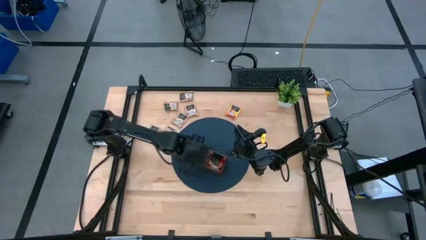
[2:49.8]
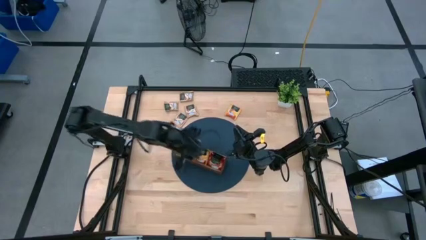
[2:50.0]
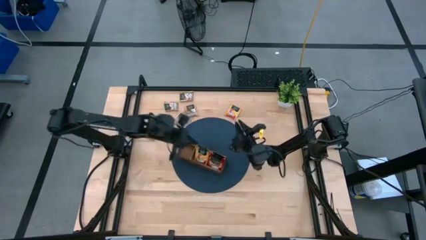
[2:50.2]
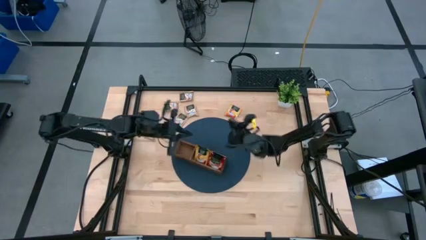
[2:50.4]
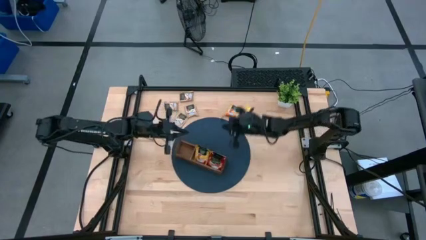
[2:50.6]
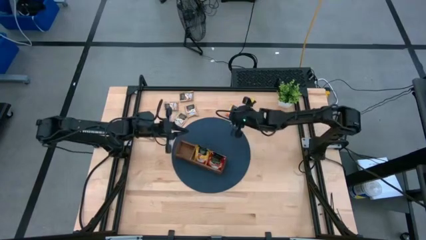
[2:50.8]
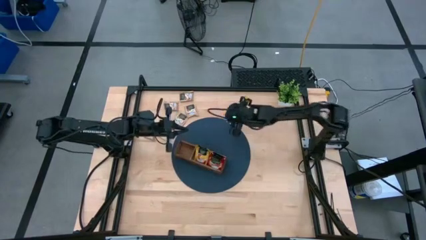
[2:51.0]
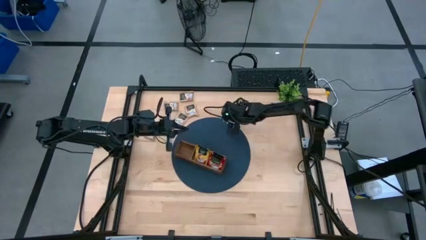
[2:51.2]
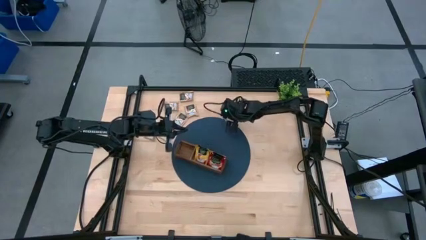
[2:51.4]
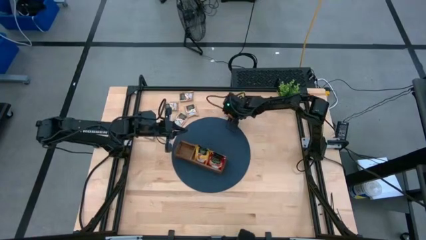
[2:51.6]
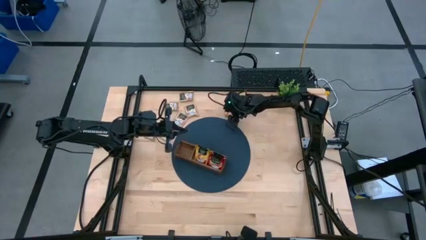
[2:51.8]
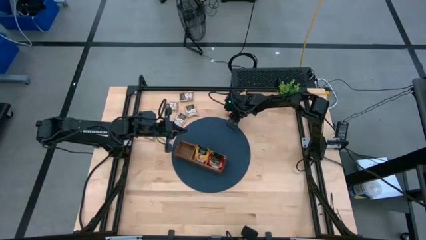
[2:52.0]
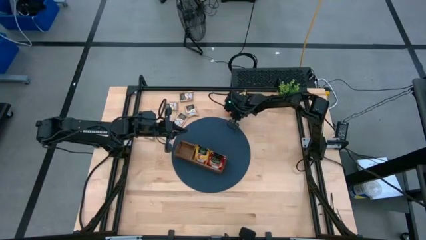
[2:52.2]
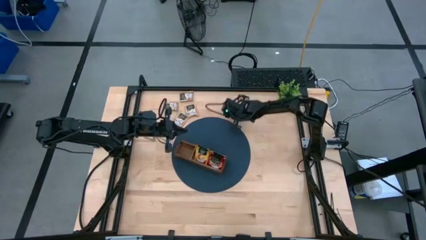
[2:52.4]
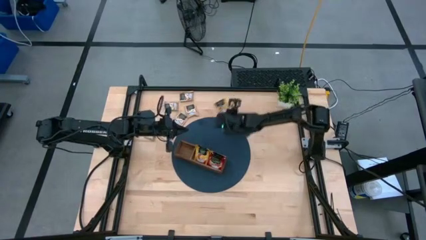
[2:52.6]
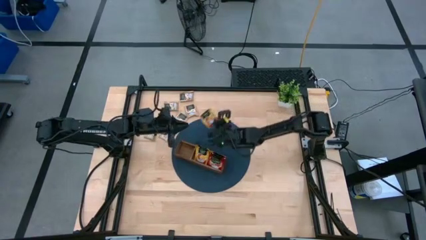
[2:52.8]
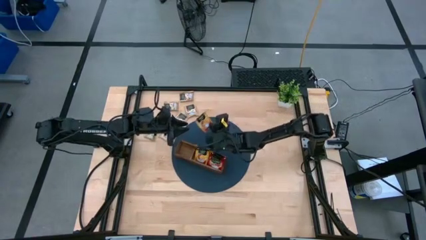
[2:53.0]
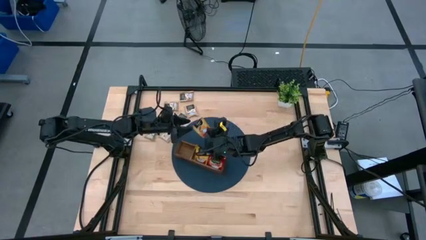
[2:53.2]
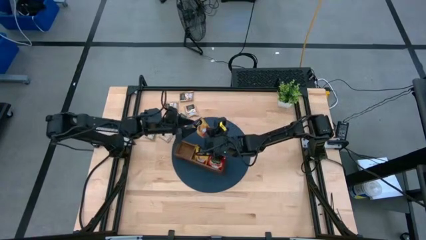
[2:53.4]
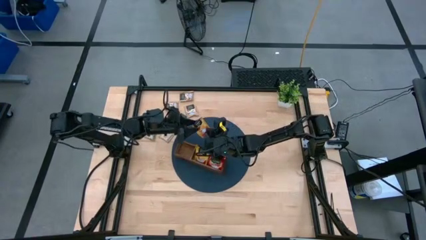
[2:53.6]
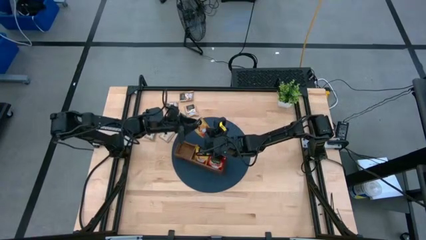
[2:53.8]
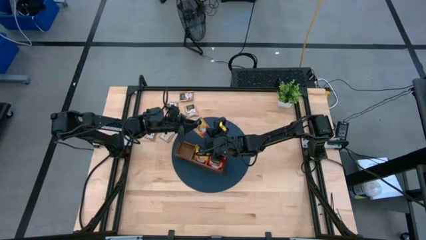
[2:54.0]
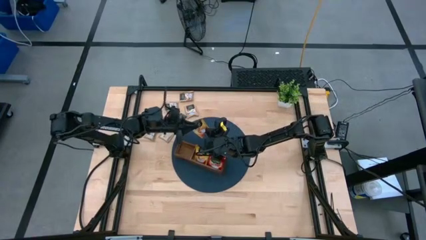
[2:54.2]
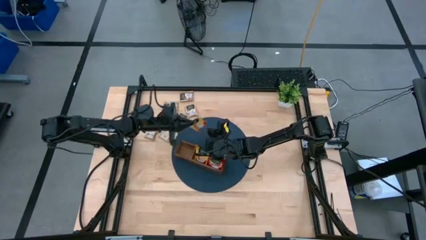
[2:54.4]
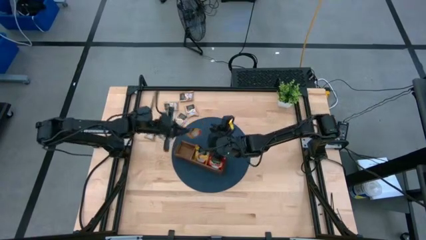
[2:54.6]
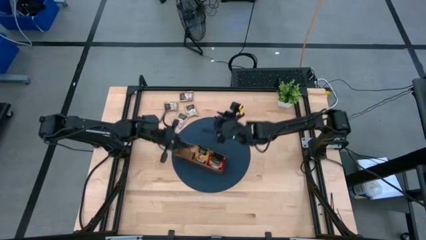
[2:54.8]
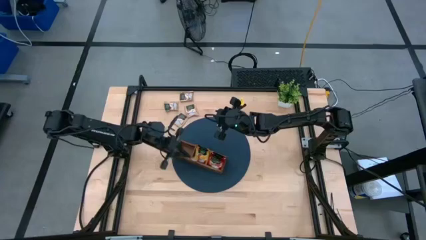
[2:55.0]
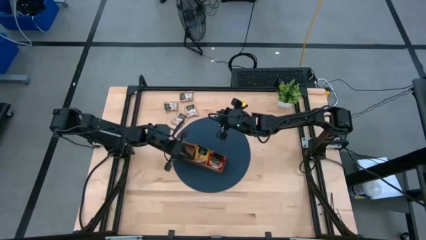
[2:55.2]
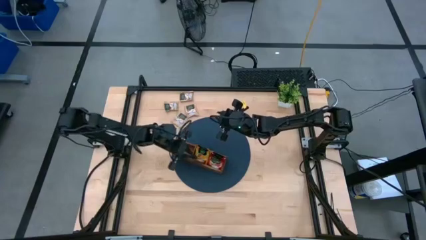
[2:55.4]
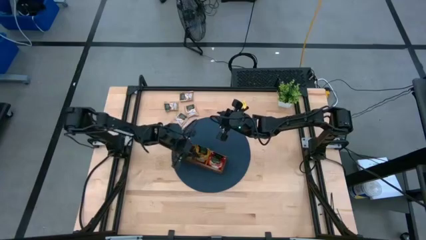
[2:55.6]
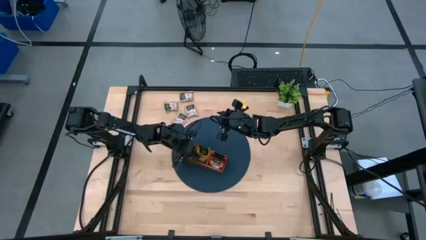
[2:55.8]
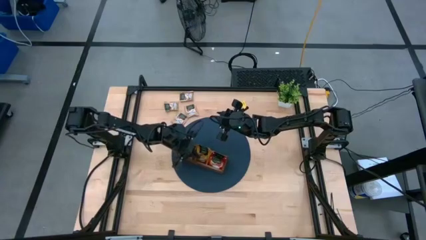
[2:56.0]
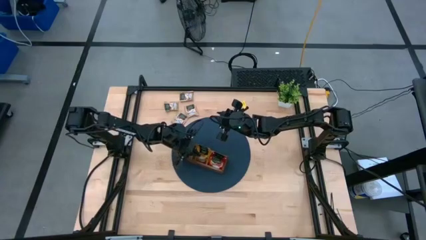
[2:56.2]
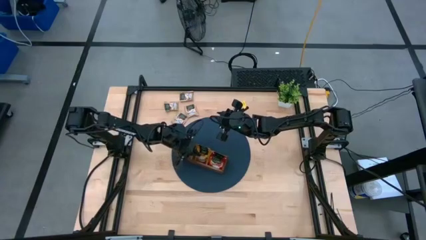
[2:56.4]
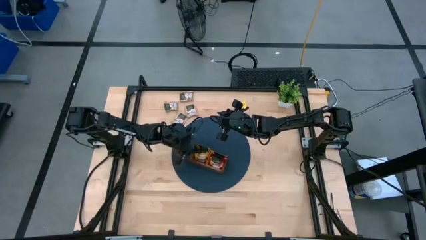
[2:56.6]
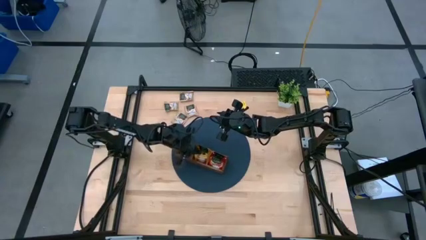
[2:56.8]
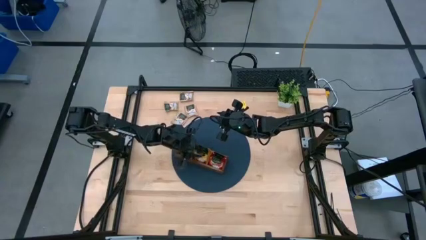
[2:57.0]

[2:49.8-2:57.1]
Task: Pick & Place Tea
Put the yellow tea bag into the middle section of the wooden organizer

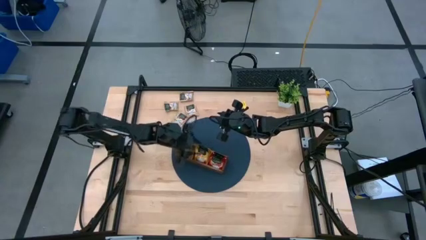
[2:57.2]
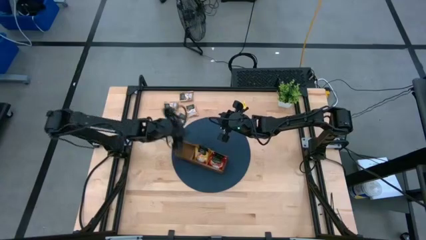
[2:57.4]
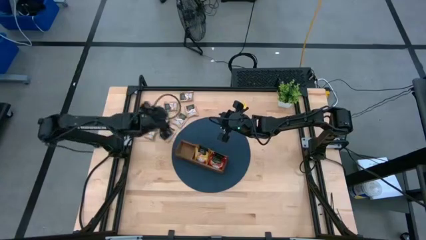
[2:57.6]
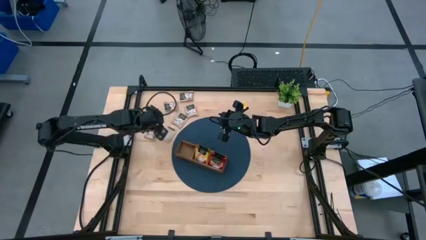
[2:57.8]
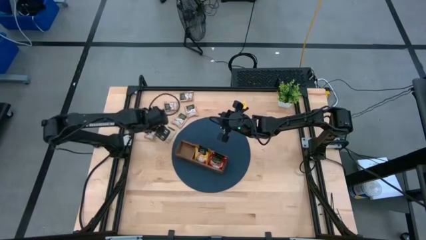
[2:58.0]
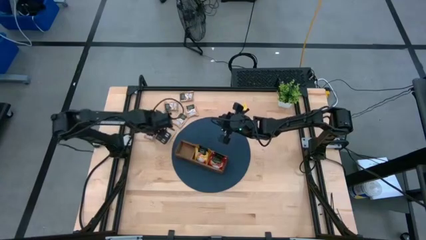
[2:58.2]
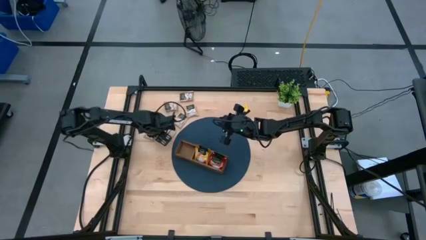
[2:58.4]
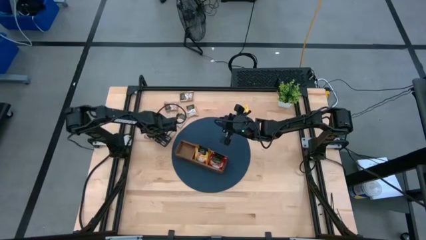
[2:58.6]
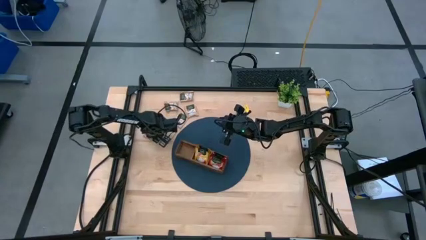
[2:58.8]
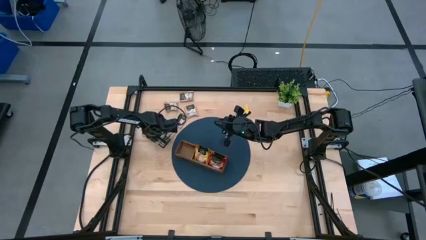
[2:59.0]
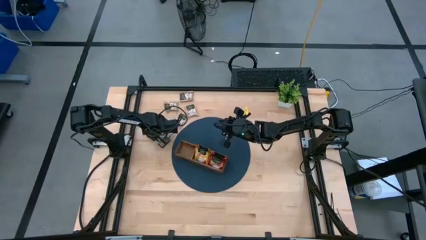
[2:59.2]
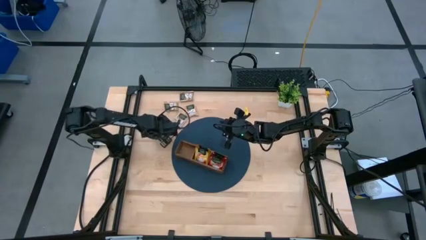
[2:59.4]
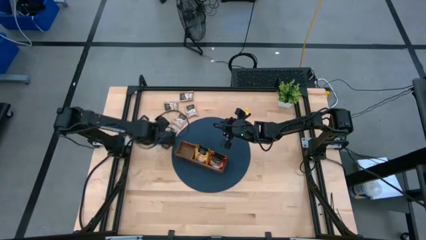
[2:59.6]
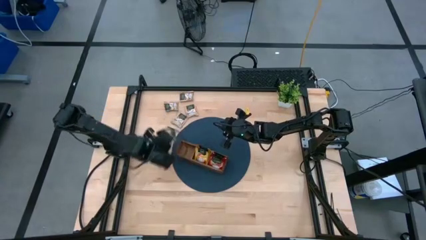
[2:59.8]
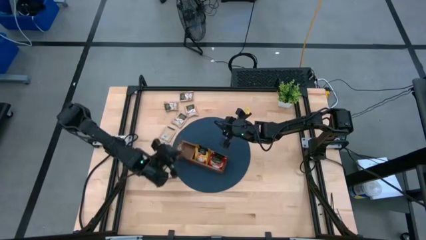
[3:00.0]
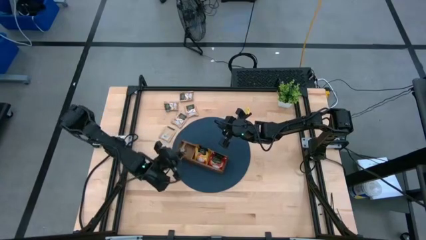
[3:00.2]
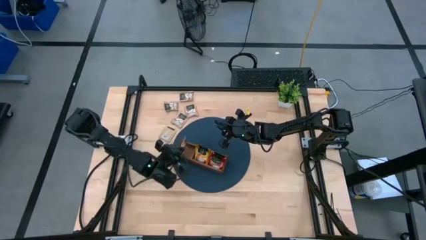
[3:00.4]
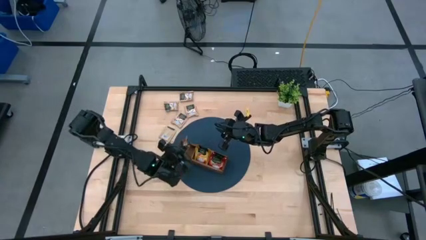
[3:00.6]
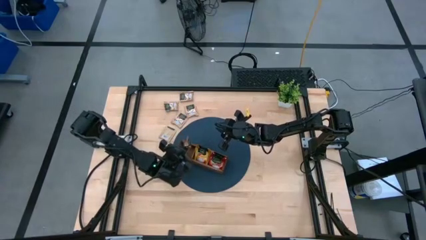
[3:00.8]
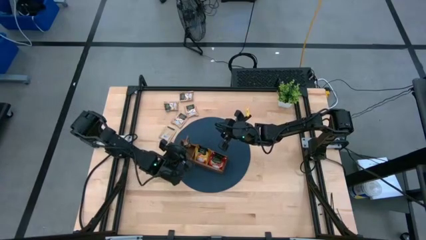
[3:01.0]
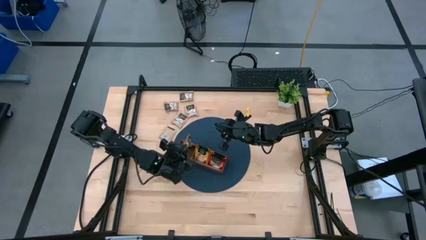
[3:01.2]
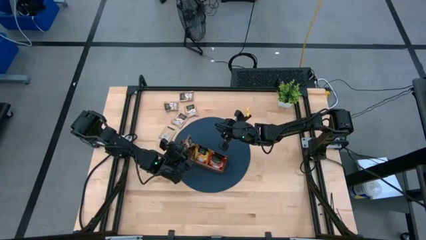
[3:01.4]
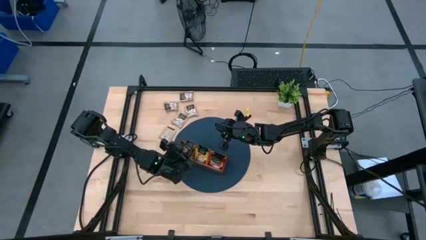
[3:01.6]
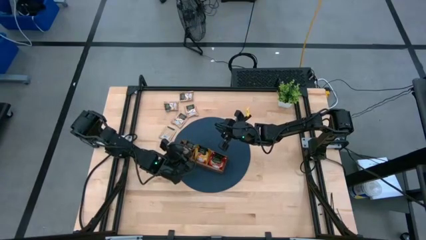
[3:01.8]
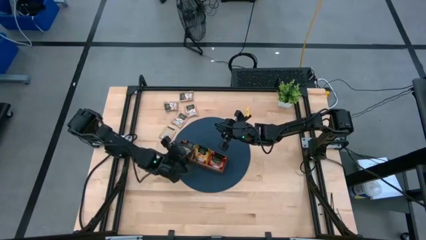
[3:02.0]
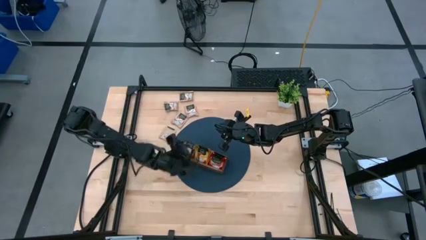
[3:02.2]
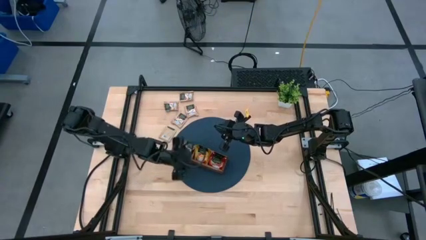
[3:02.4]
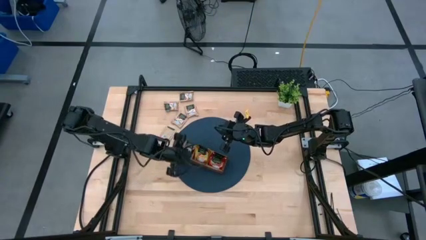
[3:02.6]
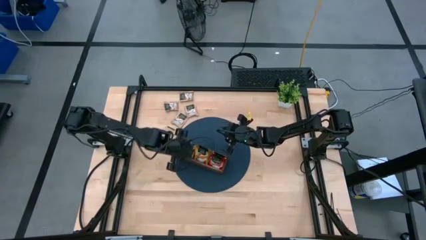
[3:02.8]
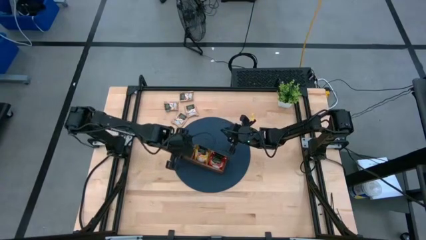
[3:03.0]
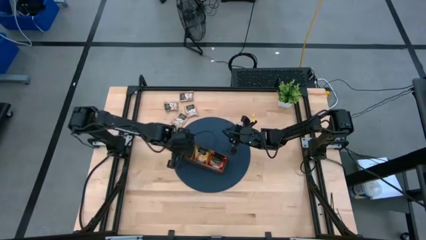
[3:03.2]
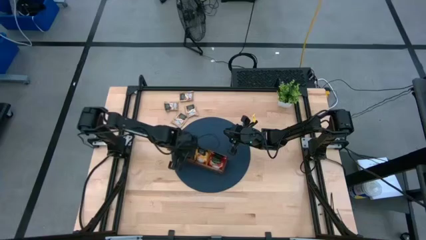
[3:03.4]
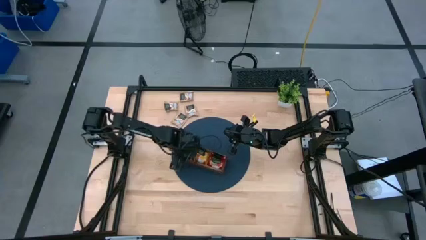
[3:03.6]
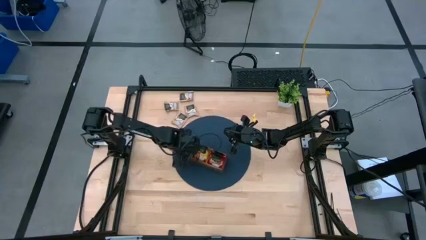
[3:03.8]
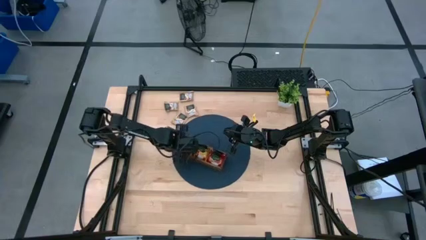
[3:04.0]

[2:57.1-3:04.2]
Put the brown tea bag into the left section of the wooden organizer

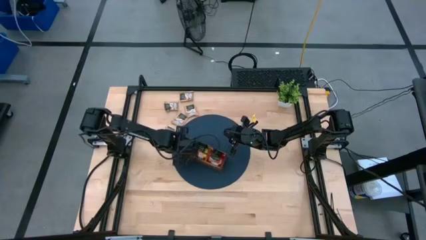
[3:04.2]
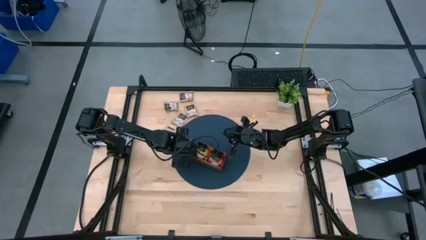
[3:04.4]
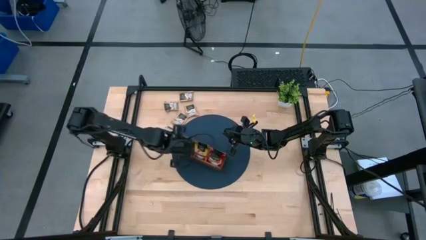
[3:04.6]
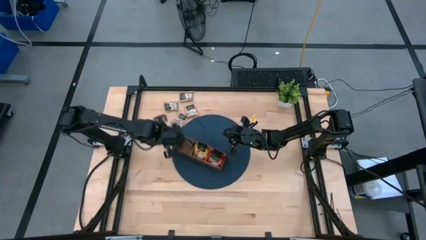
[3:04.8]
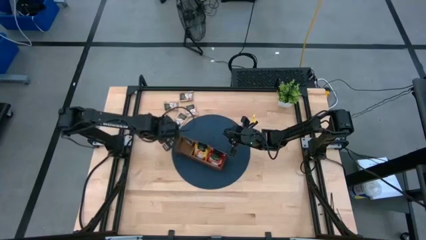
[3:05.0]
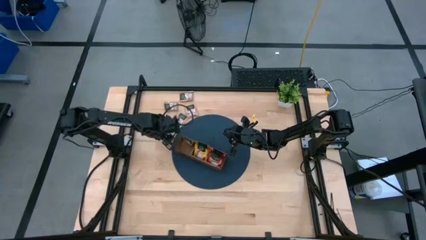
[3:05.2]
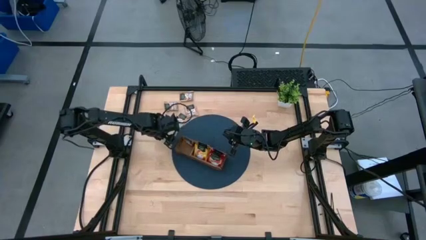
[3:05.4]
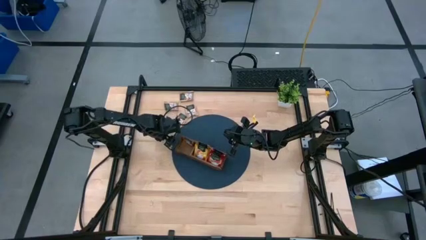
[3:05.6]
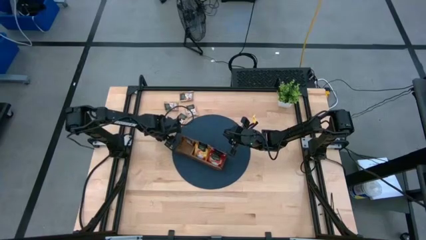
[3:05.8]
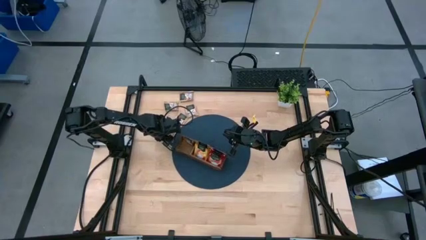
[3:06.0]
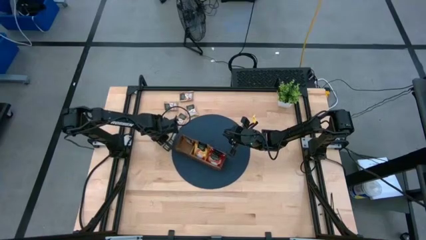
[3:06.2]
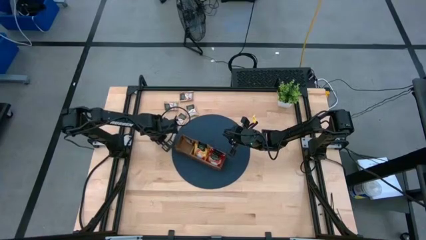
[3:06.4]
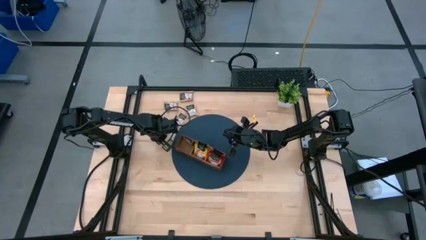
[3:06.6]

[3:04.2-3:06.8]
Put the brown tea bag into the left section of the wooden organizer
